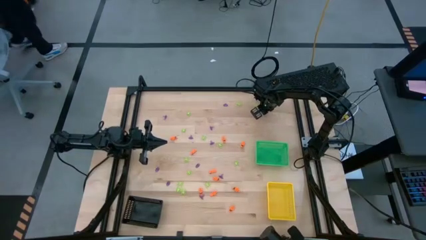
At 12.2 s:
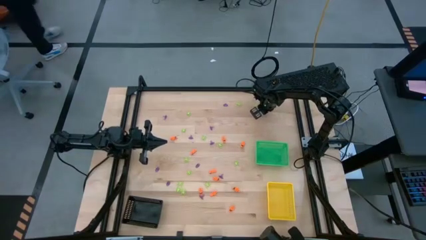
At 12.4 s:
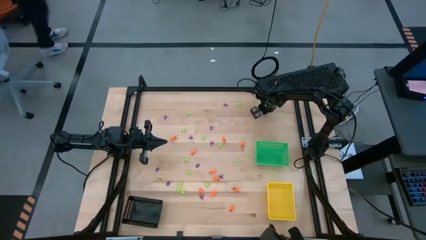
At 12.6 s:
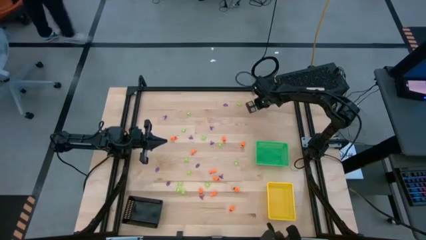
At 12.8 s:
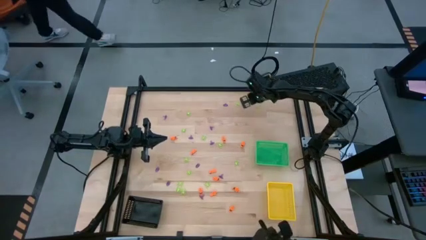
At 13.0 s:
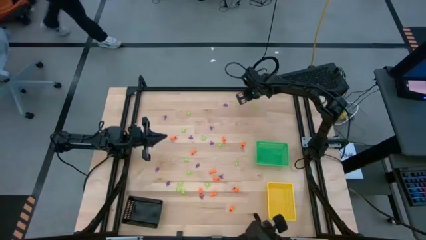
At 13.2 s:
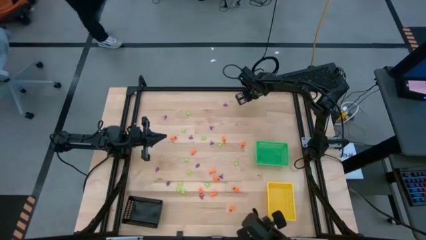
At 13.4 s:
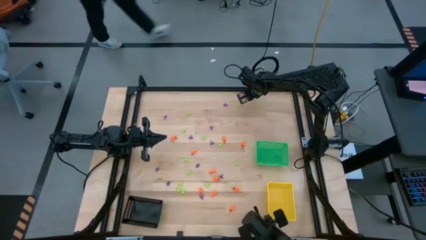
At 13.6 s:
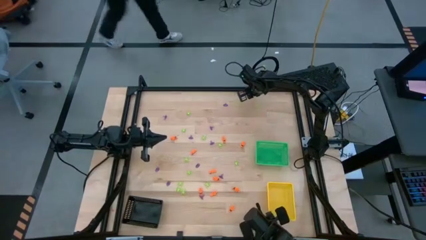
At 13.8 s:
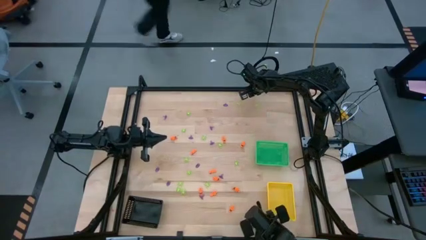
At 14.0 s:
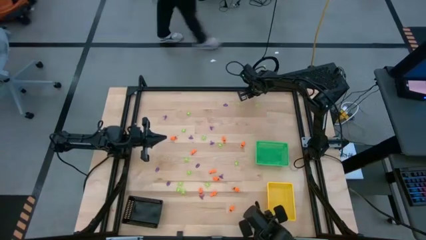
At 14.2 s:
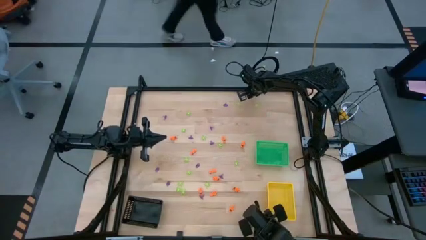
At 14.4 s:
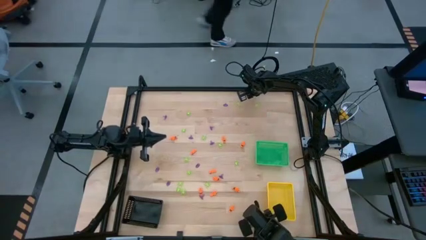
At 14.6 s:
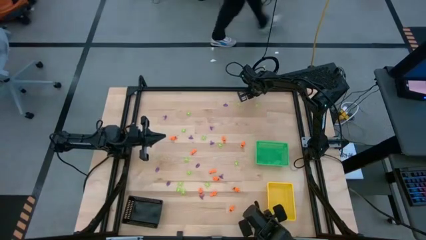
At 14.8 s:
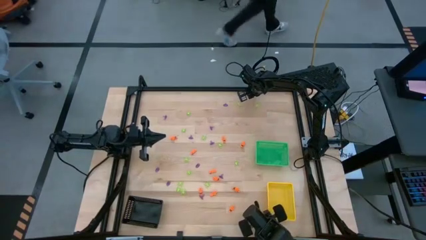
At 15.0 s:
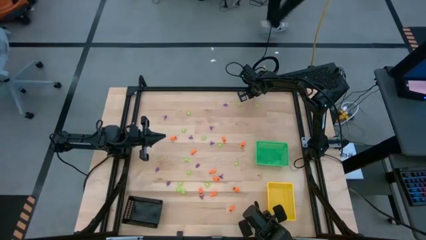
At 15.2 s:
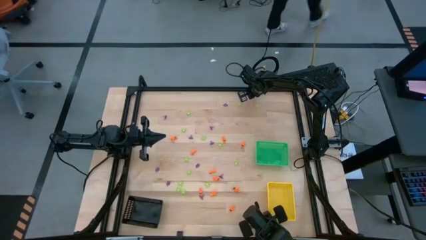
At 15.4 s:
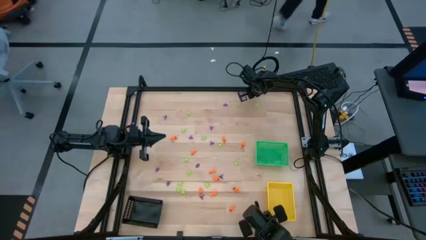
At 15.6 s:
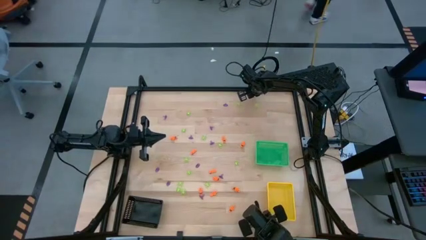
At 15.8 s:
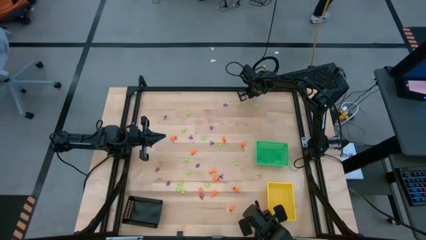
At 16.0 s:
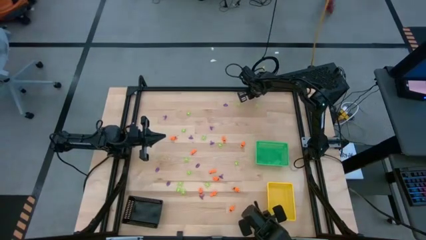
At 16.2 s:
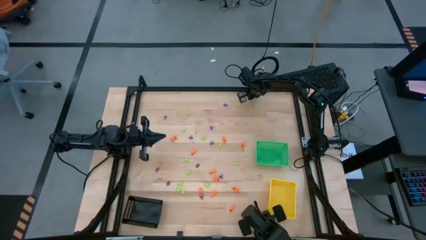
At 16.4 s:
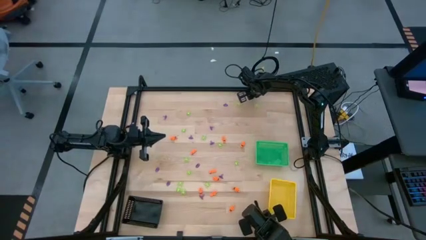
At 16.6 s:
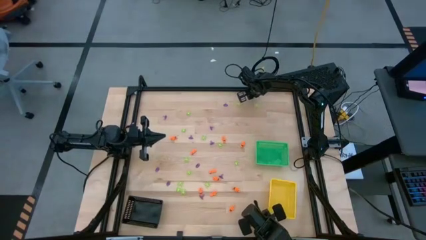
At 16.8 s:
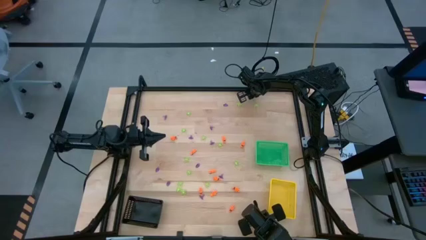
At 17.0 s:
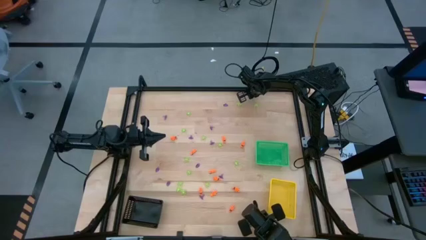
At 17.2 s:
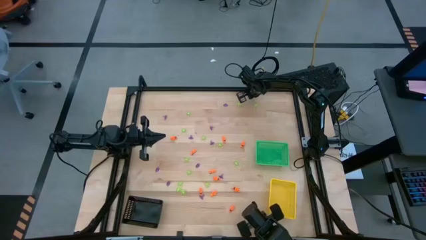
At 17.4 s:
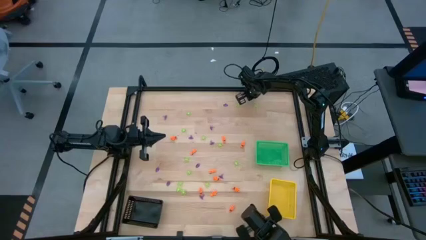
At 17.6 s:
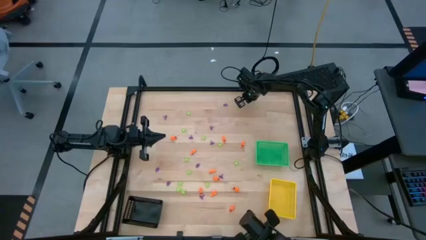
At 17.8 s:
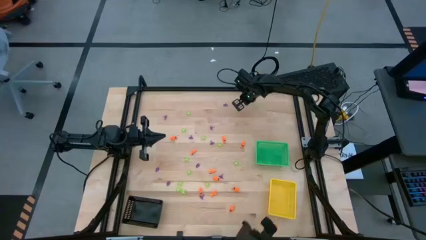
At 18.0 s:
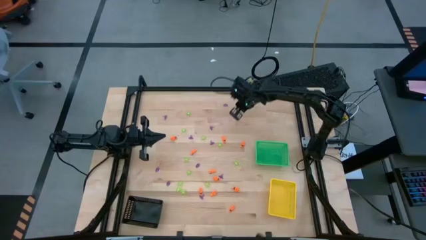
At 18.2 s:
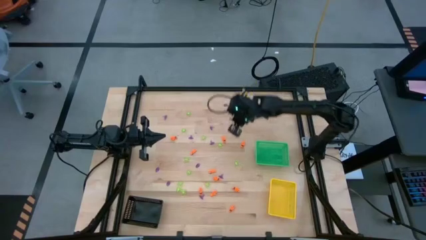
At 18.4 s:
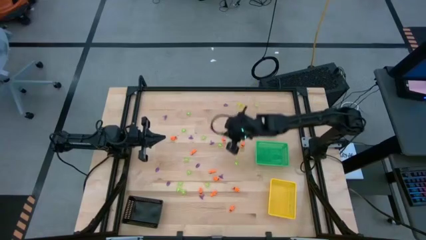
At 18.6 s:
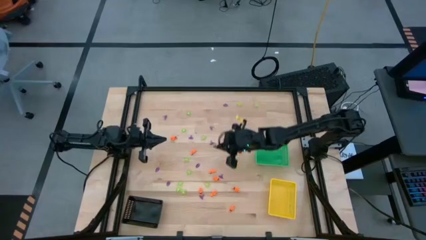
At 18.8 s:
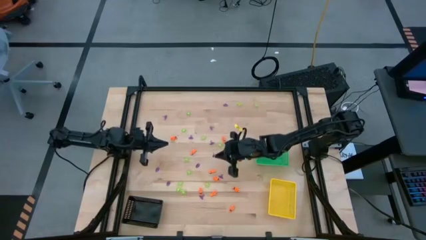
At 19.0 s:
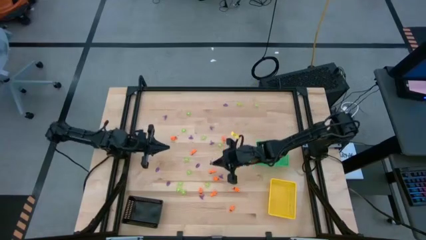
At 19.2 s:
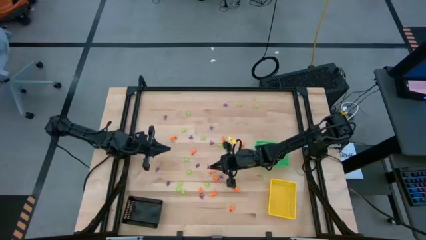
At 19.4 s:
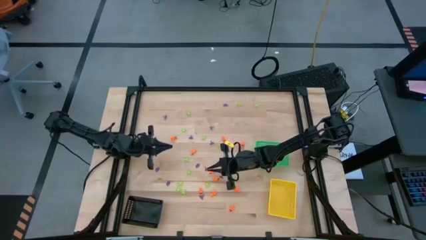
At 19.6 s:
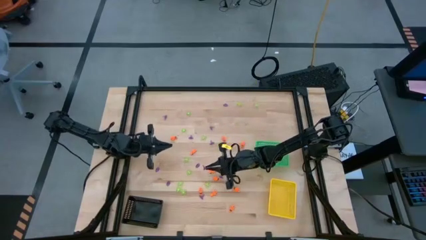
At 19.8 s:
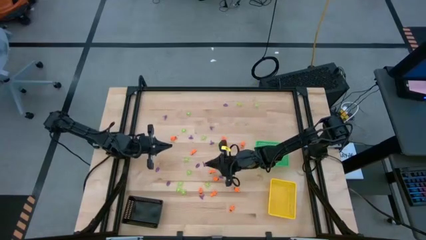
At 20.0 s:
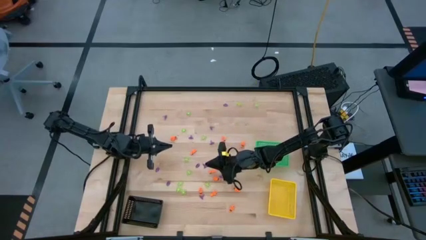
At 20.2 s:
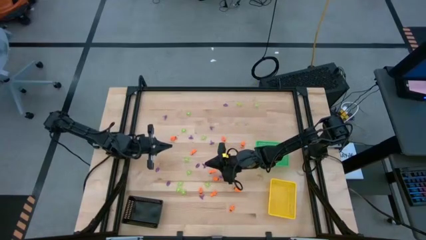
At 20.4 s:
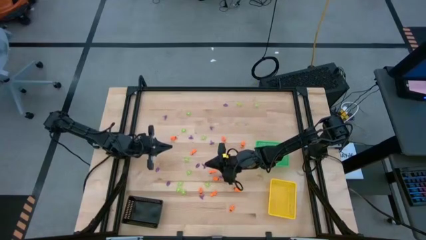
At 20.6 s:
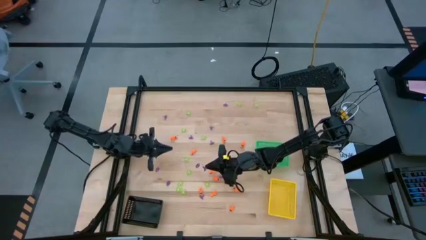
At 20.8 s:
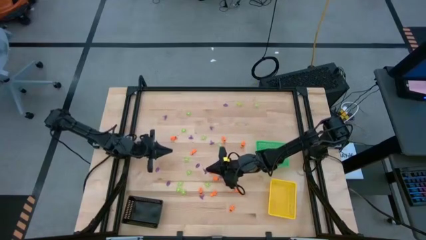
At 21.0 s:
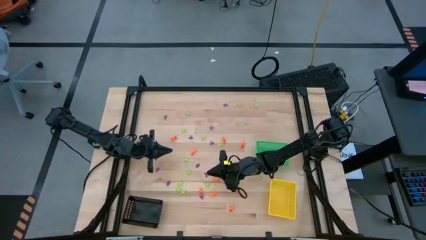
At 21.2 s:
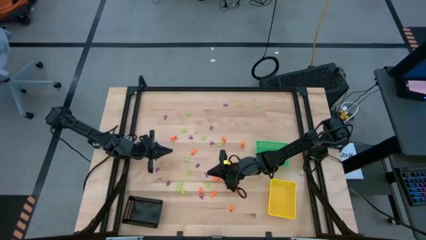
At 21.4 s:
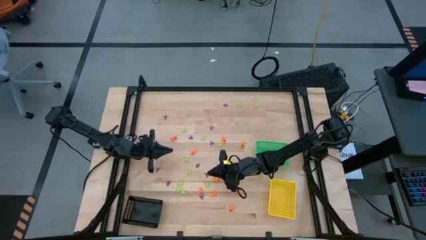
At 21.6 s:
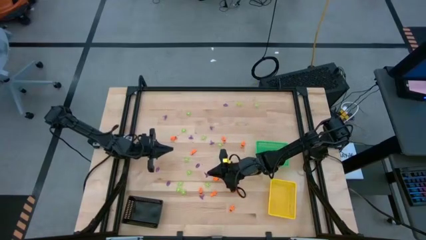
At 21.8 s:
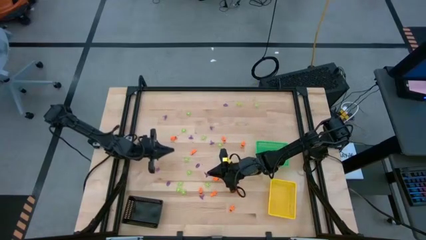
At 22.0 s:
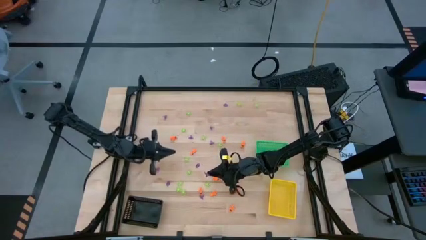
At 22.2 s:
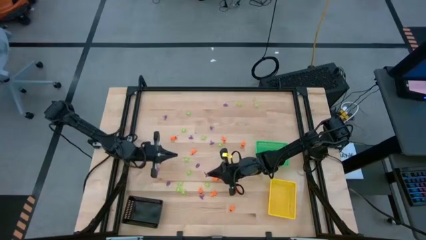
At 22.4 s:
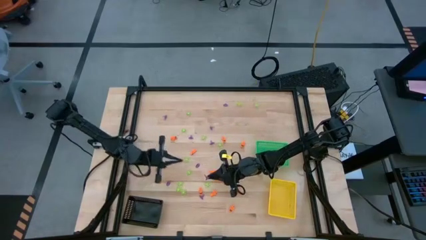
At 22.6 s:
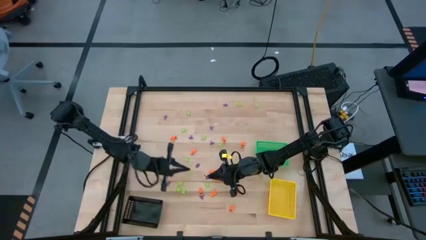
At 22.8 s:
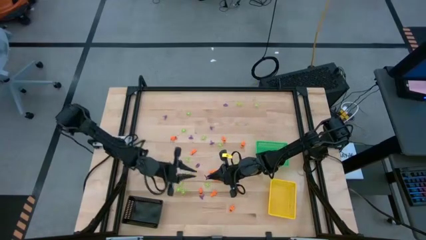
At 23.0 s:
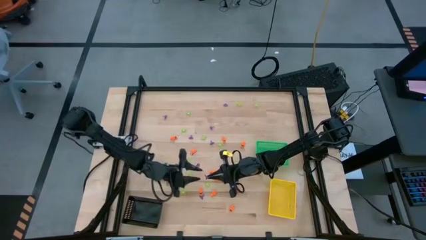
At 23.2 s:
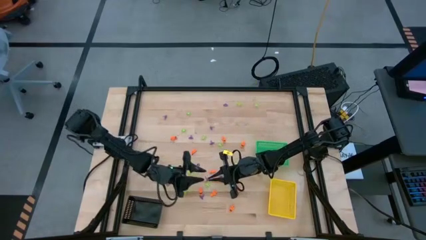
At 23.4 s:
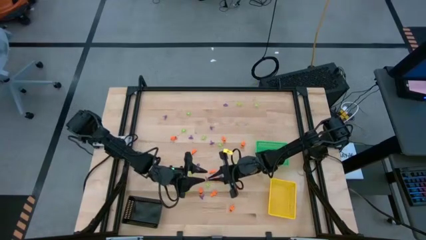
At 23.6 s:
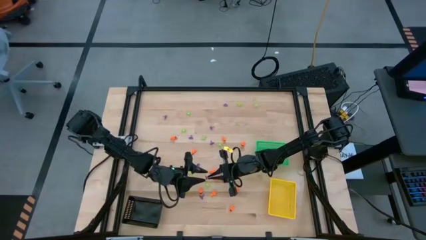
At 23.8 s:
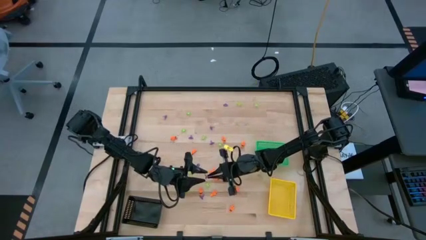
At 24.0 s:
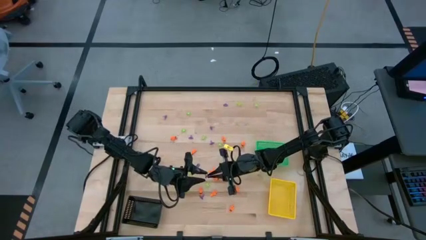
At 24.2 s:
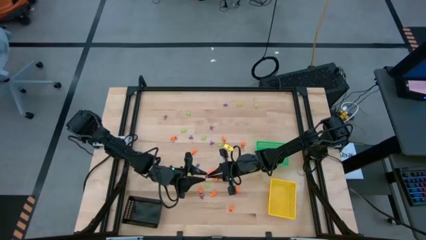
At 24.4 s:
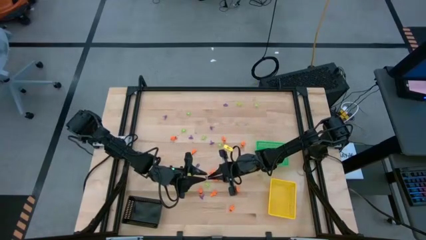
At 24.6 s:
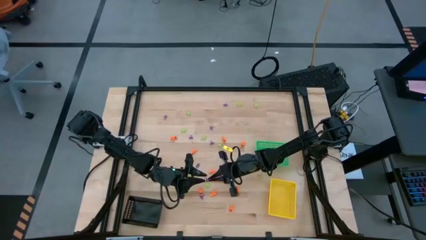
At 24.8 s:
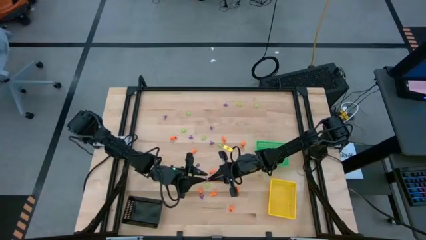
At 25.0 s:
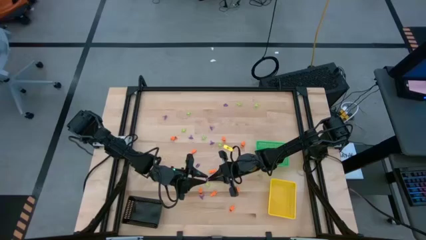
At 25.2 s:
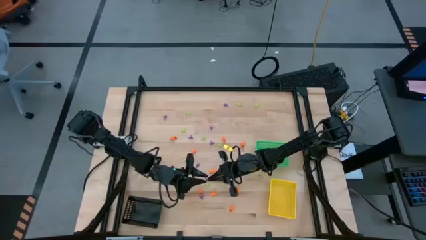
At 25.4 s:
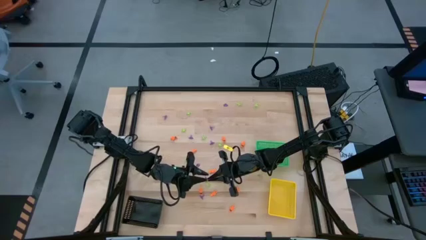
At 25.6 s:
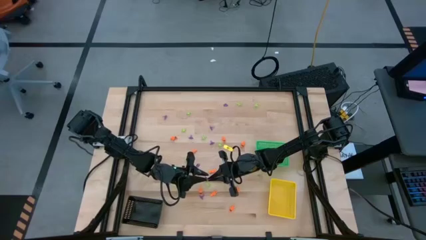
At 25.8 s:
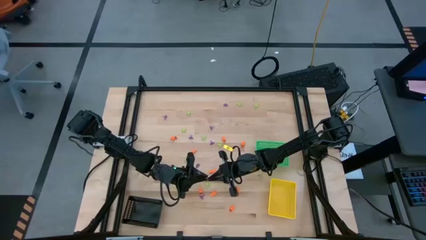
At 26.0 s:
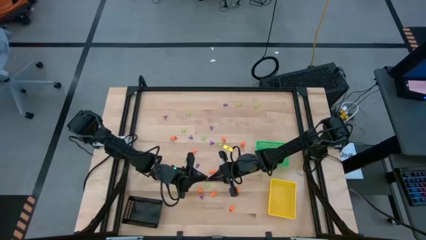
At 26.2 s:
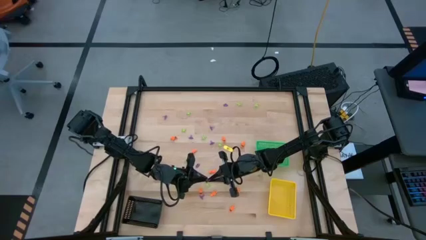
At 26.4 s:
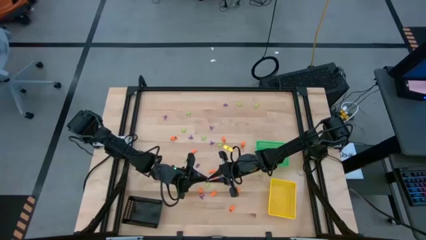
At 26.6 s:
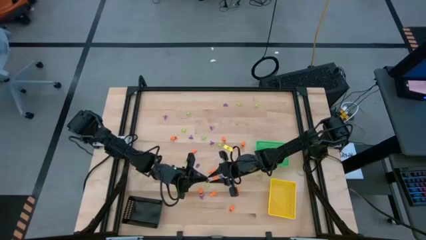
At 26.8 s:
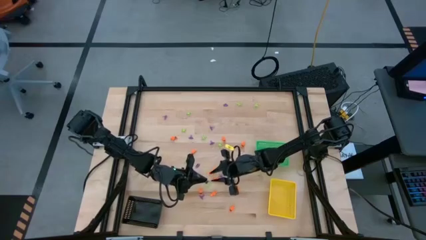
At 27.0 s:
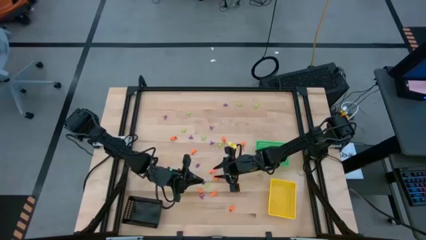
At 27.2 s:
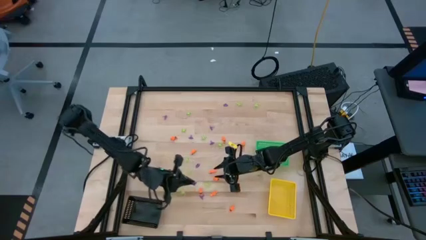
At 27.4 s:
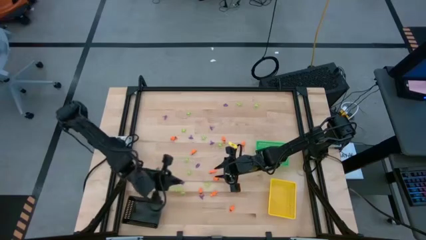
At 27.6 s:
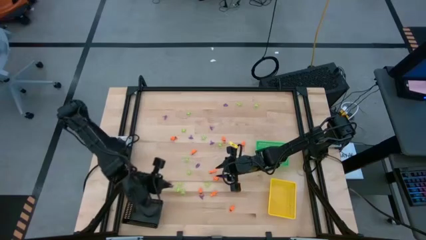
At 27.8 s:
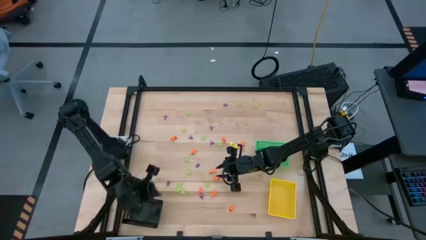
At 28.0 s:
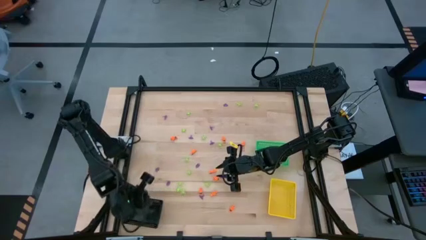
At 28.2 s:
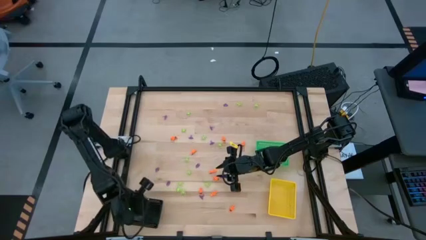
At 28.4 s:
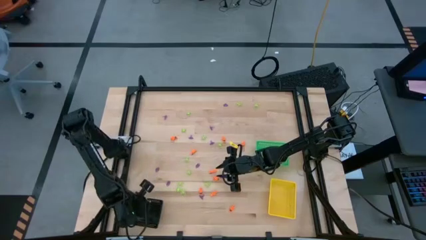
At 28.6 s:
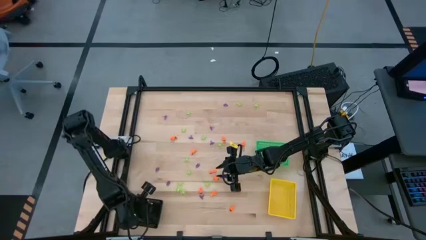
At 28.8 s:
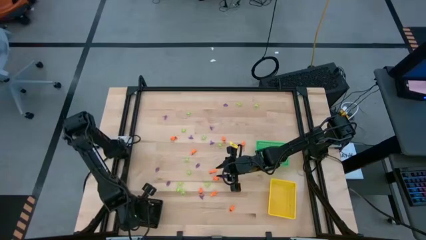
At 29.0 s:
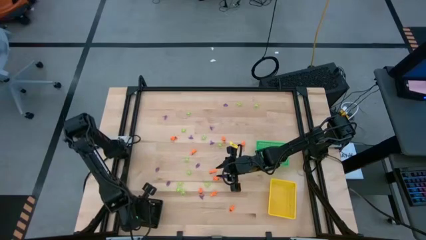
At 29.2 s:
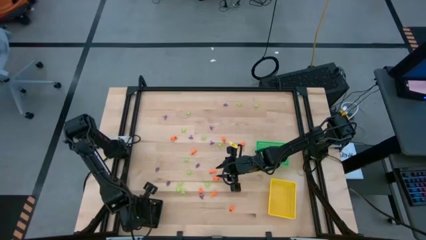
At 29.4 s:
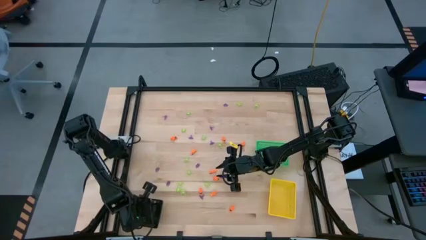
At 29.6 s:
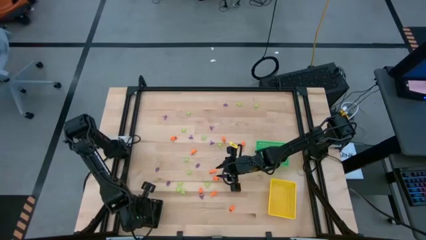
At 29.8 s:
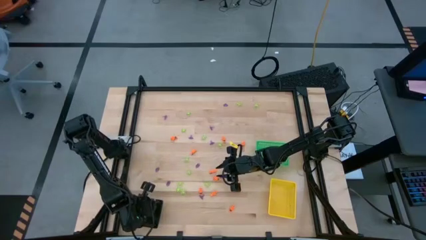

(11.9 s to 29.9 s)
Task: Sort Halloween decoration
Put the purple witch hat toy into the black bin
